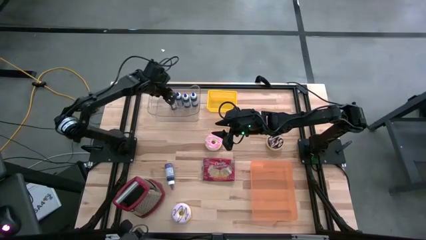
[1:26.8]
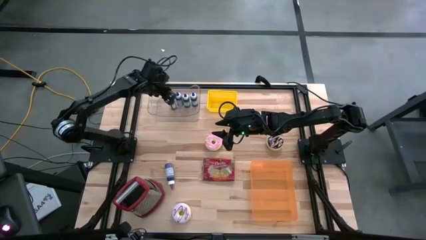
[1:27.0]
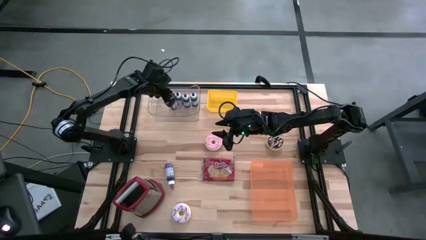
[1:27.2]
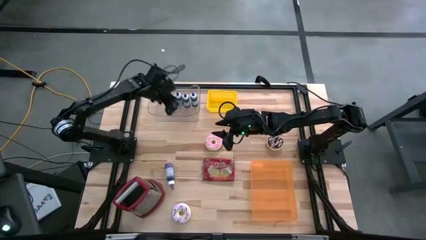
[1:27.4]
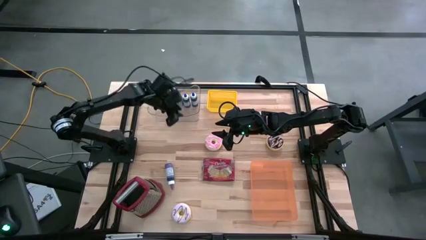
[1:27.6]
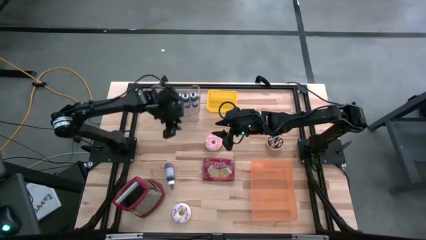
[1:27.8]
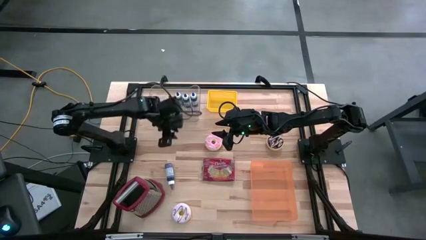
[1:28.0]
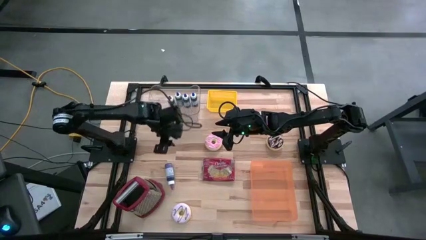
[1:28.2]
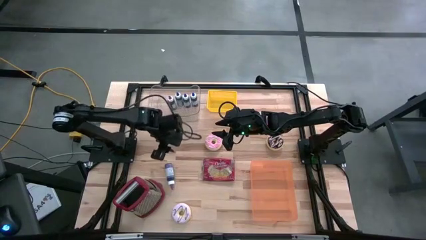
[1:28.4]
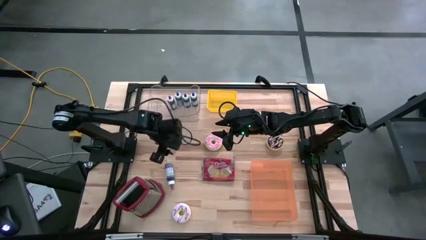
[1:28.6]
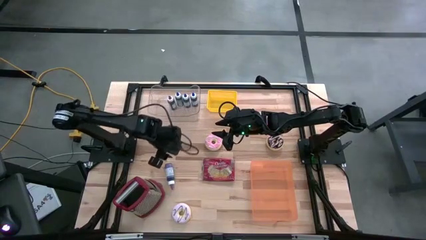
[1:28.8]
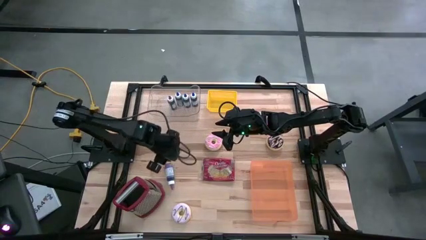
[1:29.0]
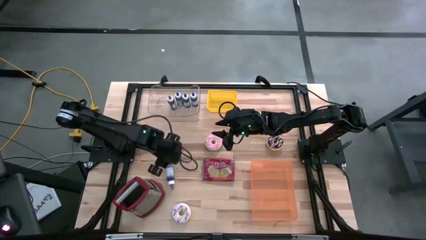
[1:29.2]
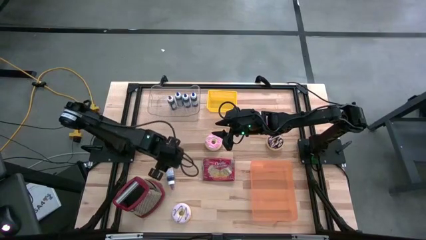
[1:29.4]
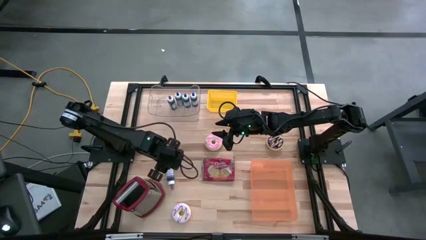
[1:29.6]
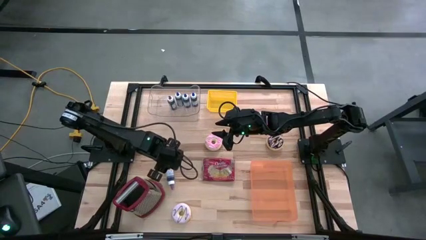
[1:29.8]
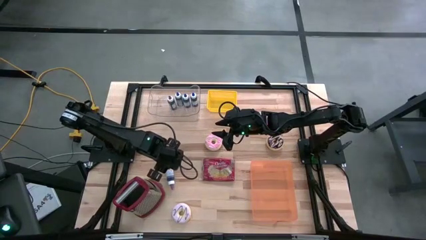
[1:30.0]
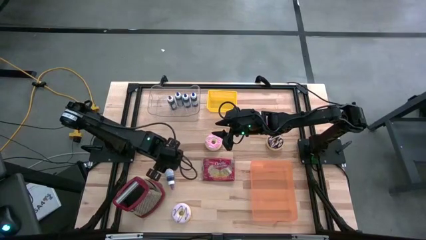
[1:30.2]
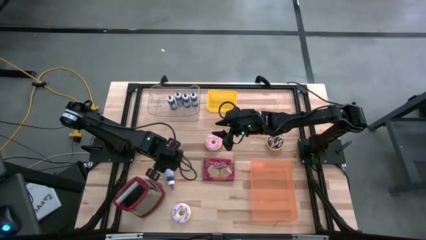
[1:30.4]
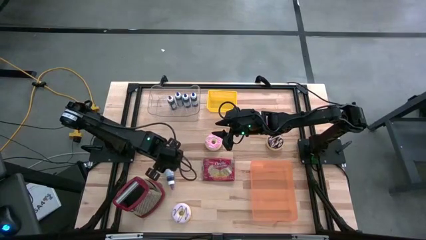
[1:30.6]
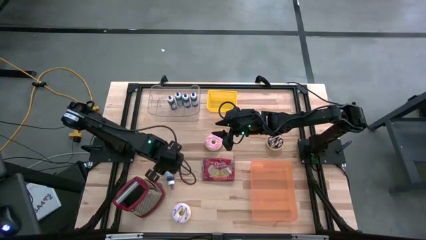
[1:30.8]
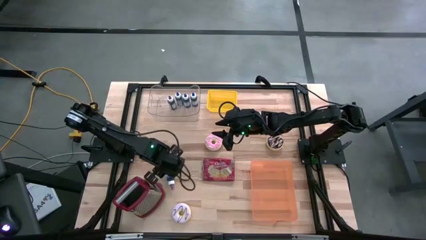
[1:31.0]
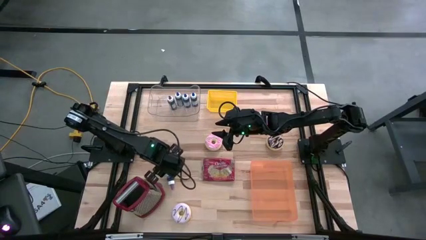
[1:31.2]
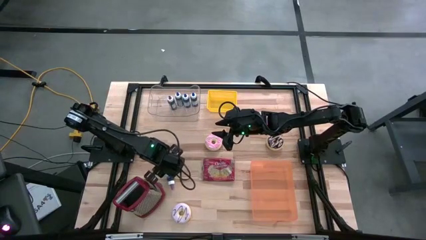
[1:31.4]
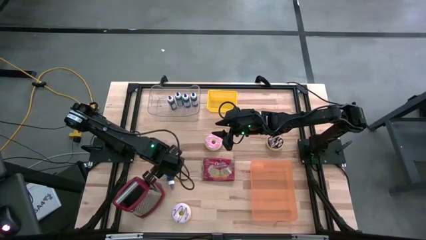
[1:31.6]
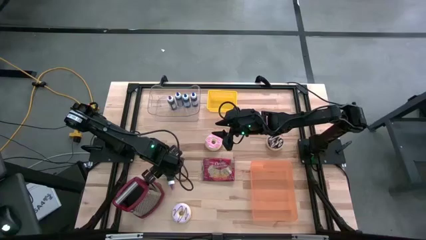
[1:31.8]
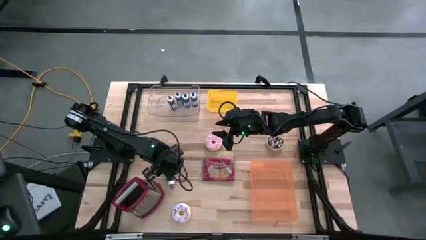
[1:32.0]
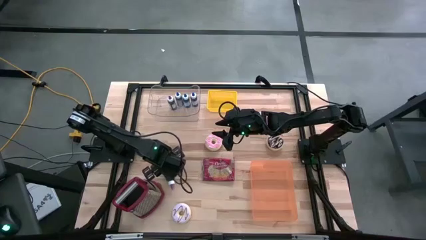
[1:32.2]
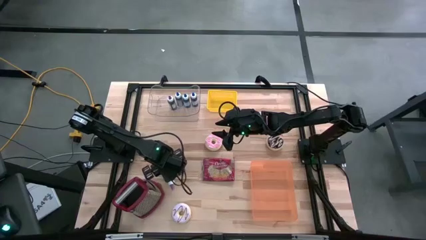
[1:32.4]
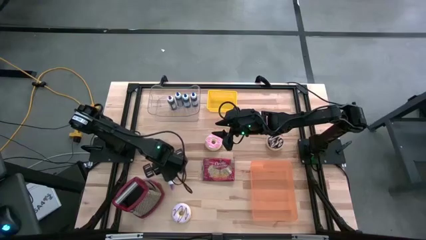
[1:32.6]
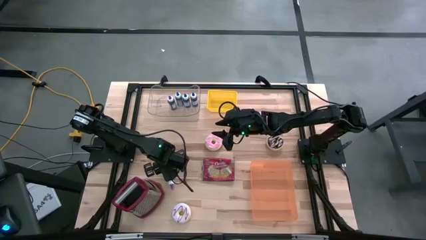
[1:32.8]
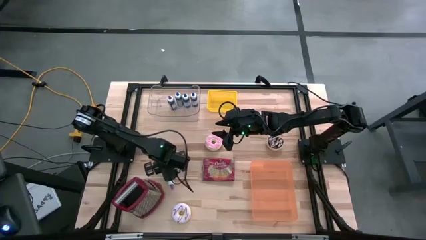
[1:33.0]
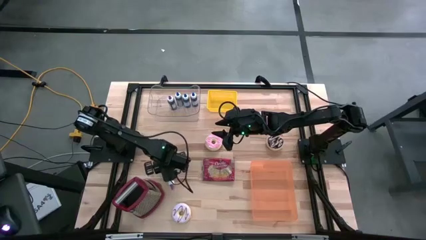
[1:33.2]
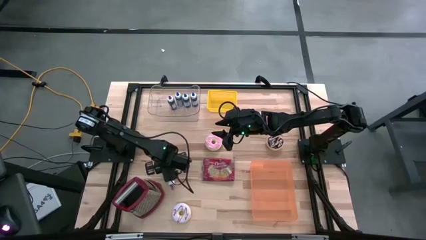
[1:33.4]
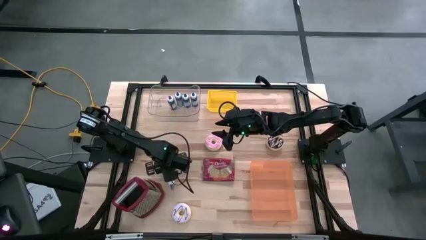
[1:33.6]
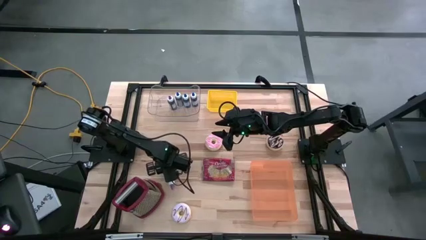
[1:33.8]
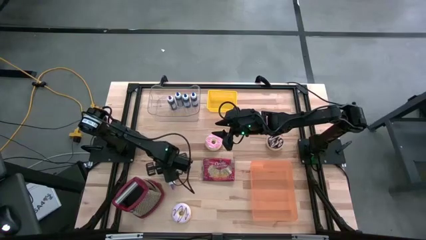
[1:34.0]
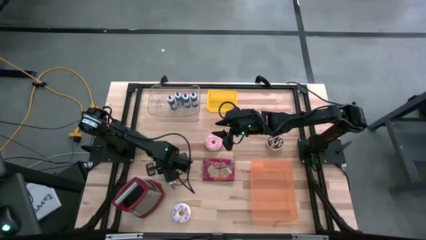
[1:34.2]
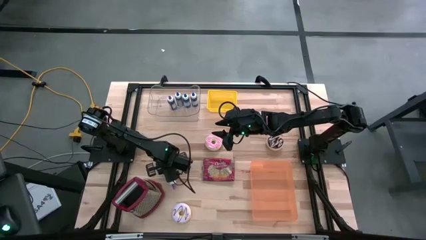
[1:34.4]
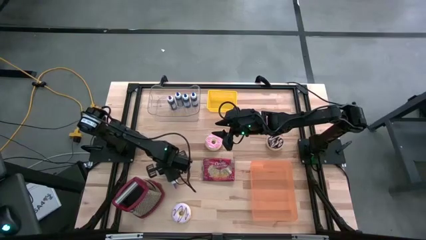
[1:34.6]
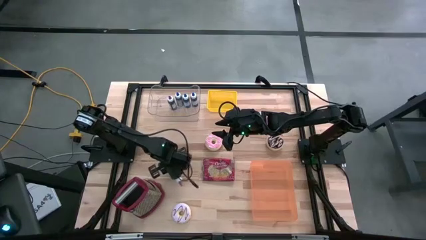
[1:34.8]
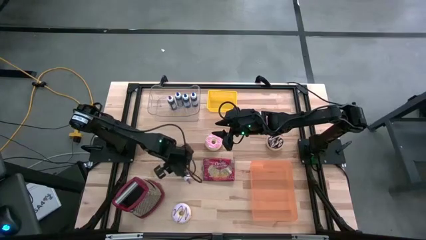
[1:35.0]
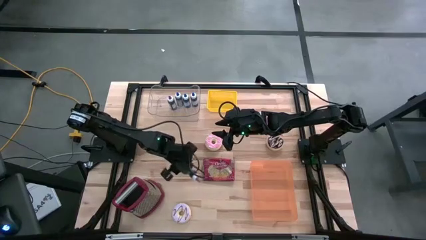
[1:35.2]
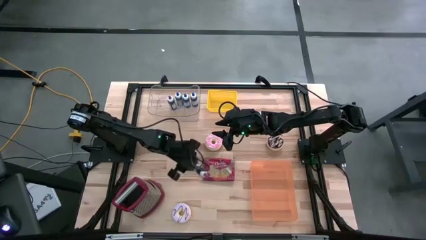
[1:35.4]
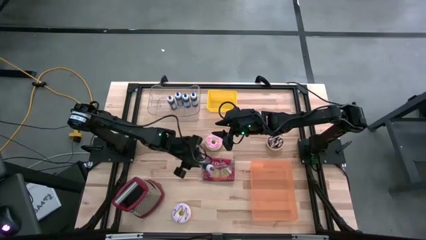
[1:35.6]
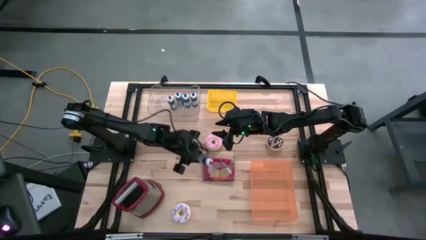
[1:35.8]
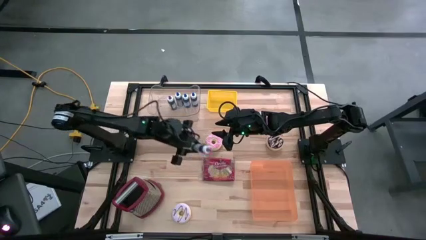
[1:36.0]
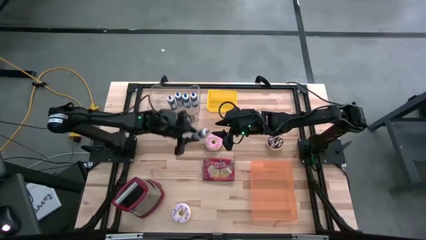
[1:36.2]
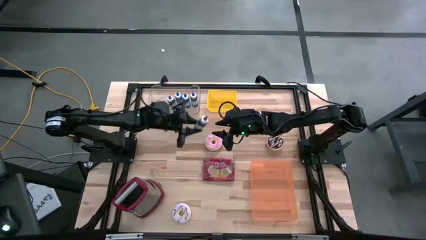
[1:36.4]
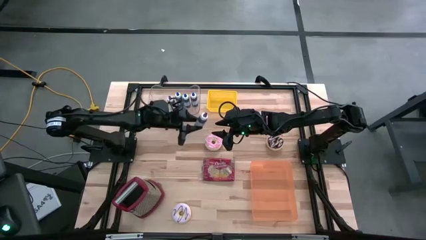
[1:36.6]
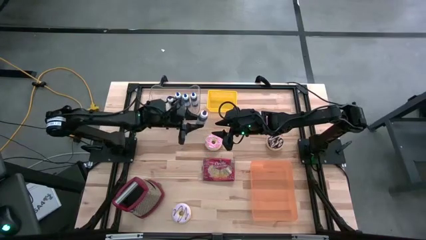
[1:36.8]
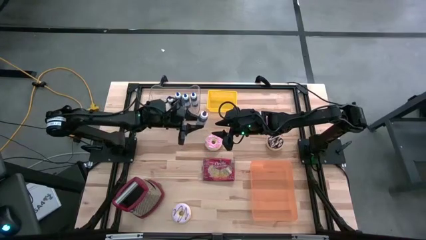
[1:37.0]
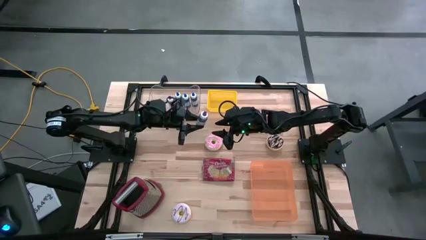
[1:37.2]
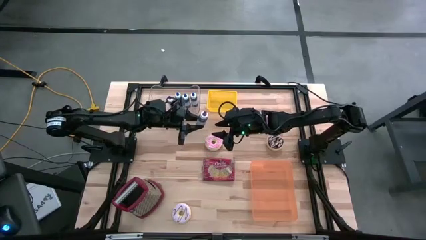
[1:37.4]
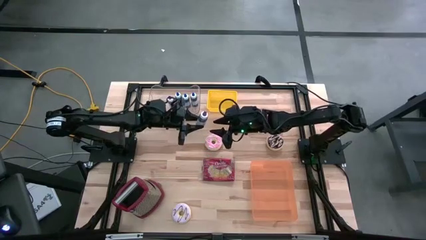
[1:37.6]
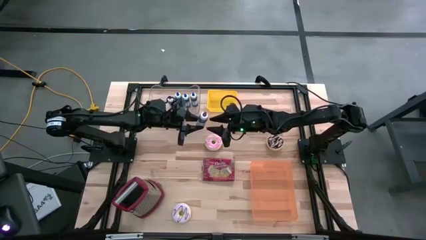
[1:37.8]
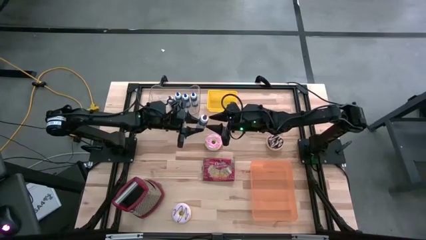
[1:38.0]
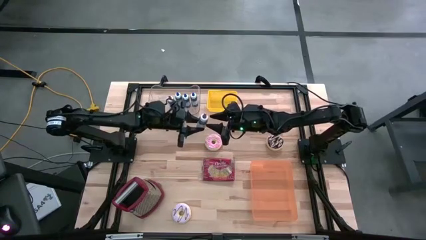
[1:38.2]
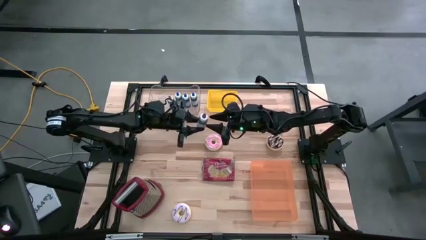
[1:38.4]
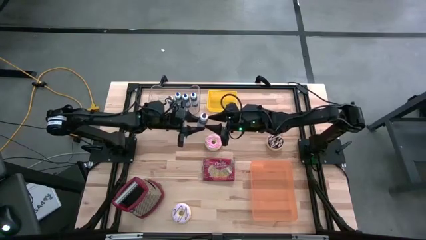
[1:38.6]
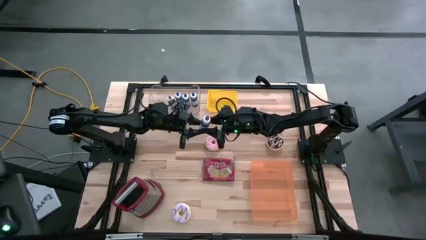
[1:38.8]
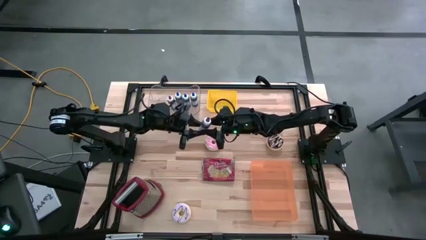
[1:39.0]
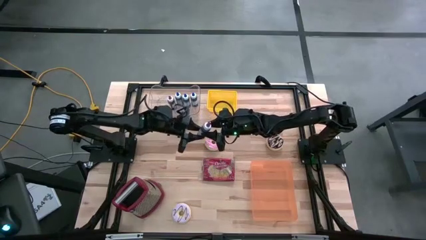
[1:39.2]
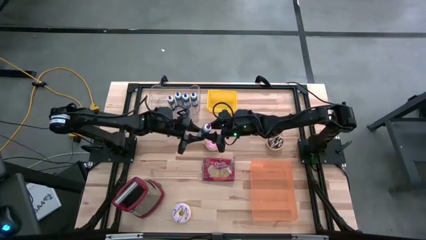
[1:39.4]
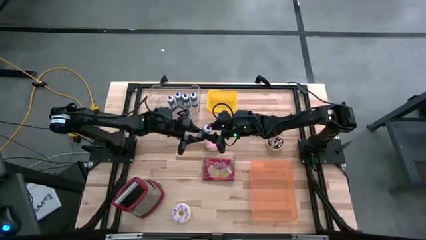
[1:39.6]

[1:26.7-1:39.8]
Put the violet food coloring bottle into the transparent bin

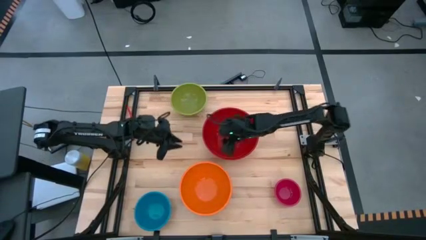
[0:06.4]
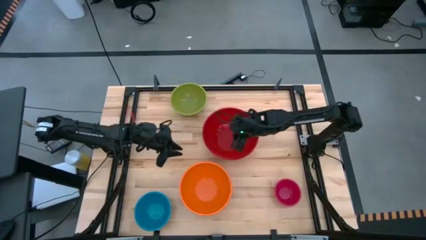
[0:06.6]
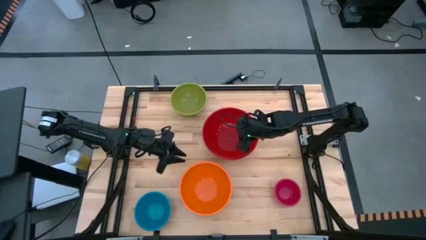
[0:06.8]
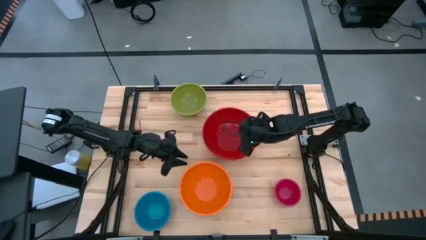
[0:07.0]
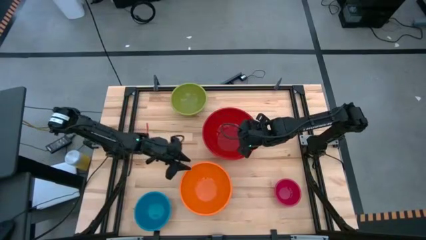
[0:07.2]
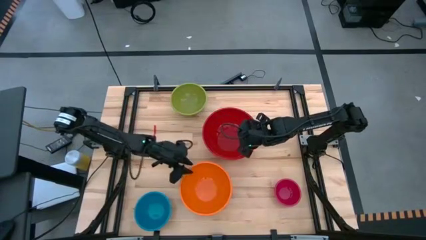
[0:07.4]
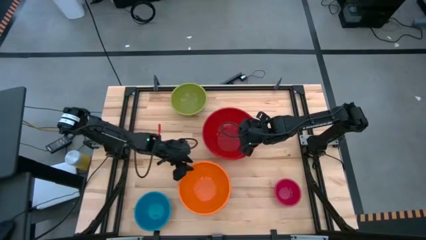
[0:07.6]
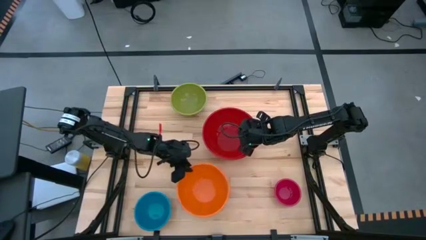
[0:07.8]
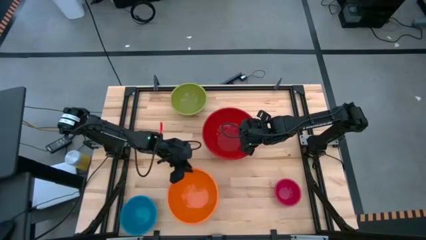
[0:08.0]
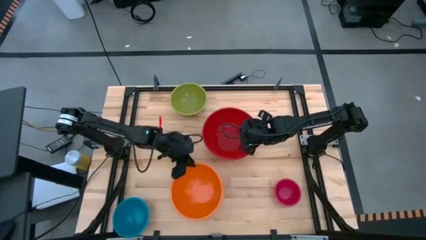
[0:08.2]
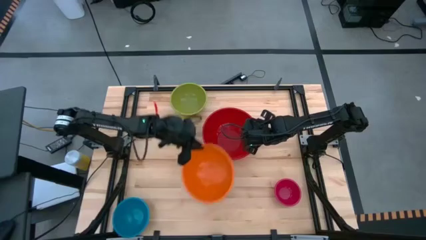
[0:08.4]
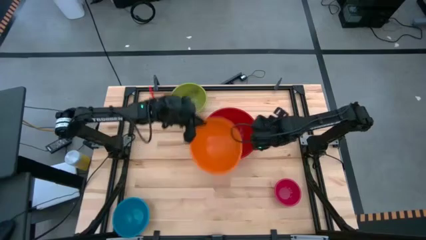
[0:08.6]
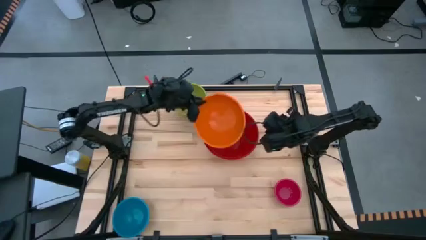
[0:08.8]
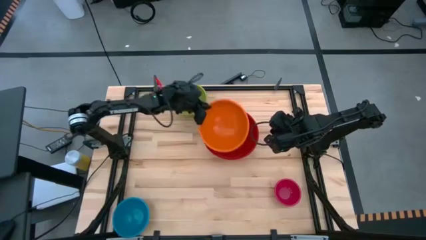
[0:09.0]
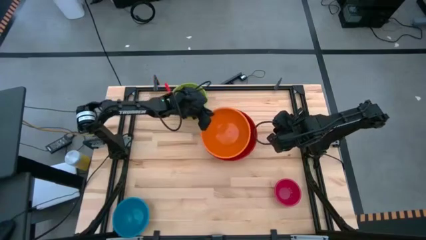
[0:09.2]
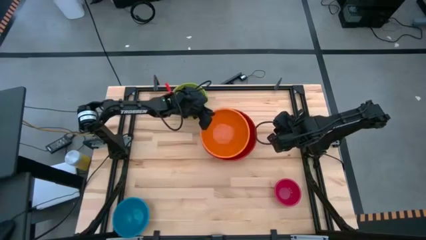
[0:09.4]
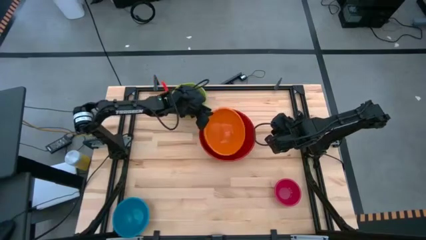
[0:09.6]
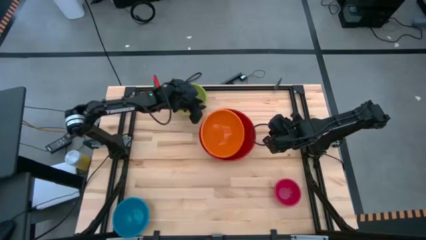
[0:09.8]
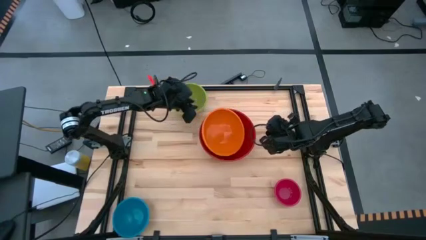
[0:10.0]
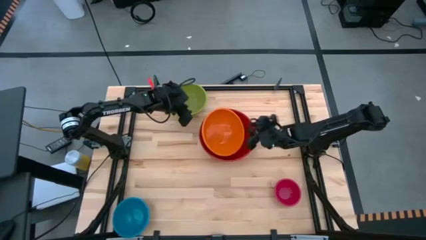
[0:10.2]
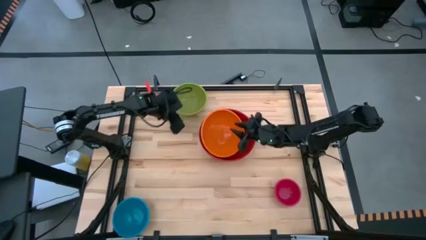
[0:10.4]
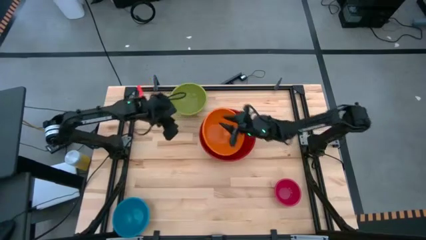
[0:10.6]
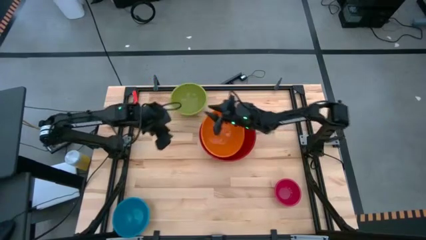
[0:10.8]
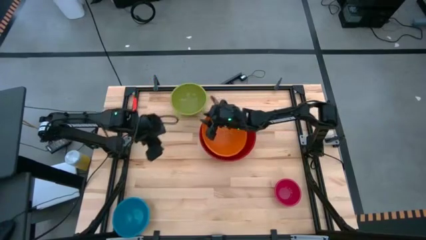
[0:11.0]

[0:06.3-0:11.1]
Stack the orange bowl on top of the red bowl
